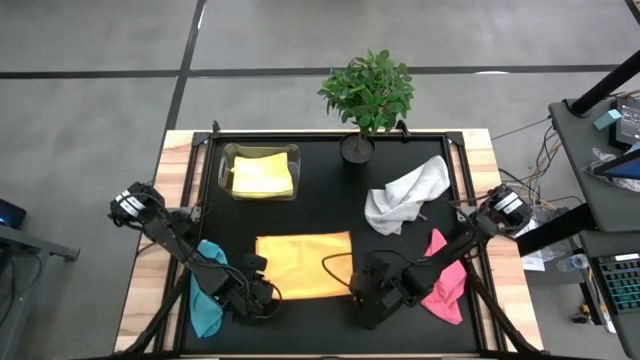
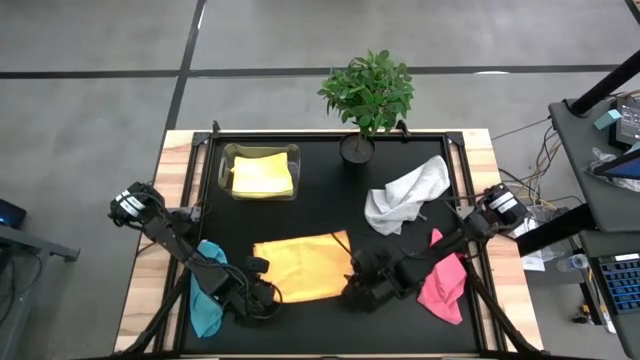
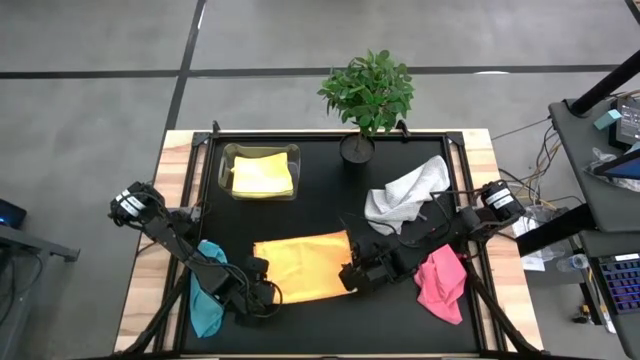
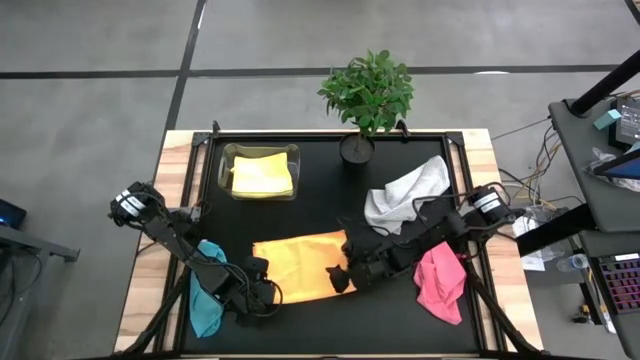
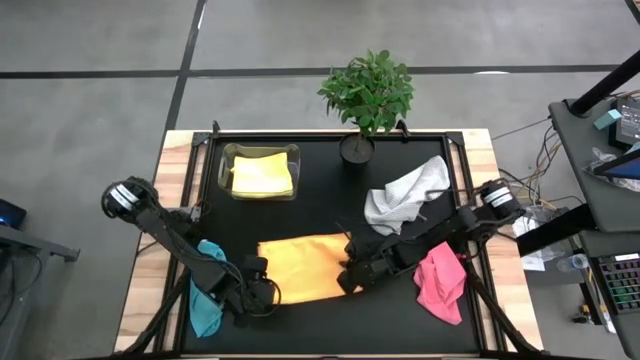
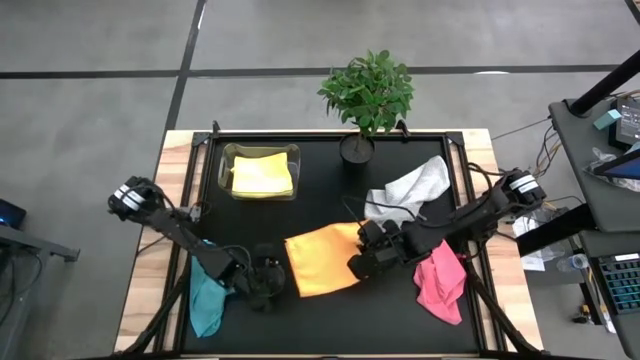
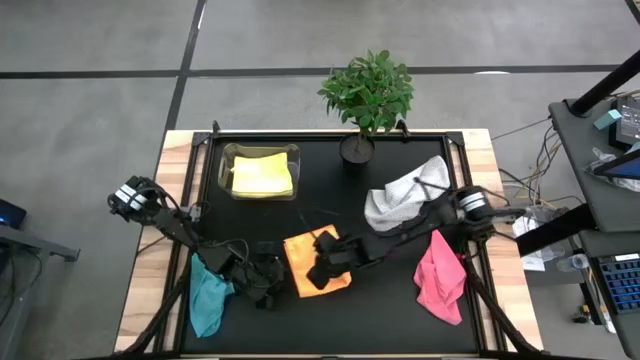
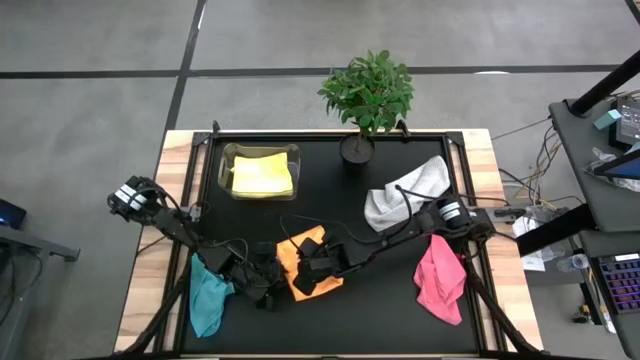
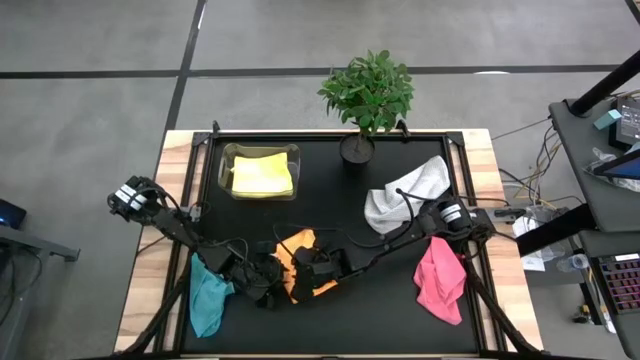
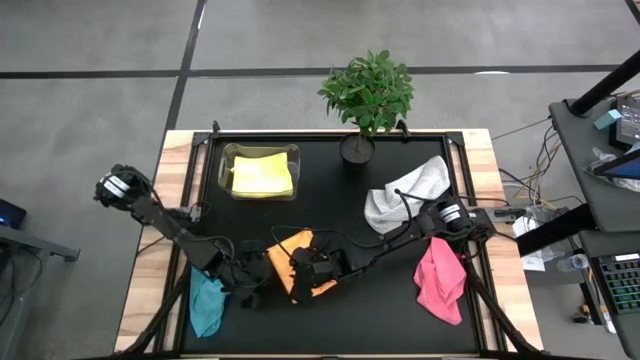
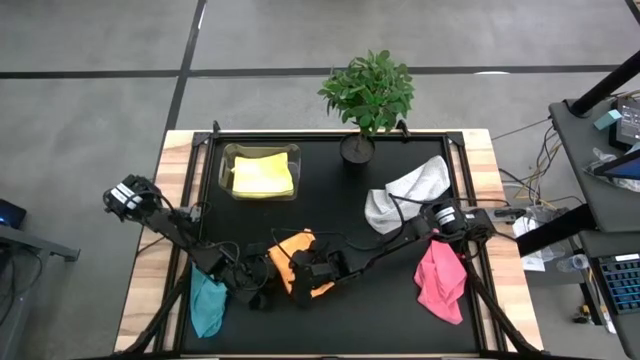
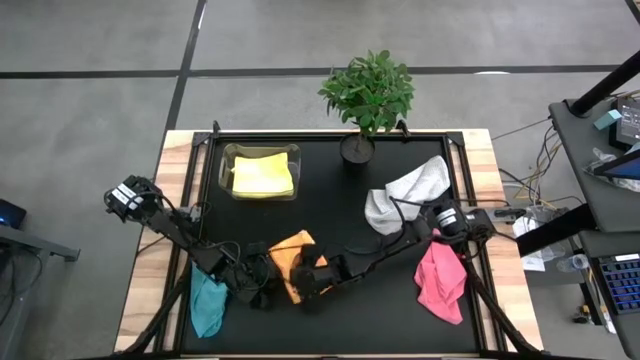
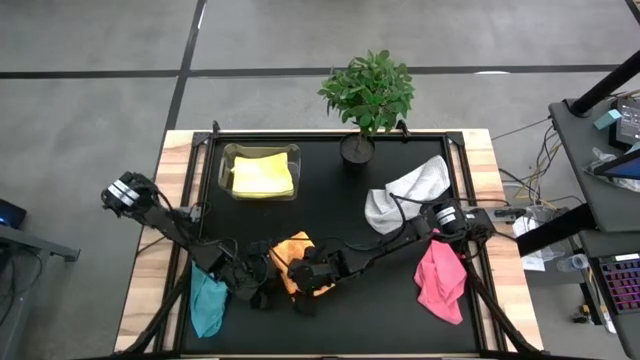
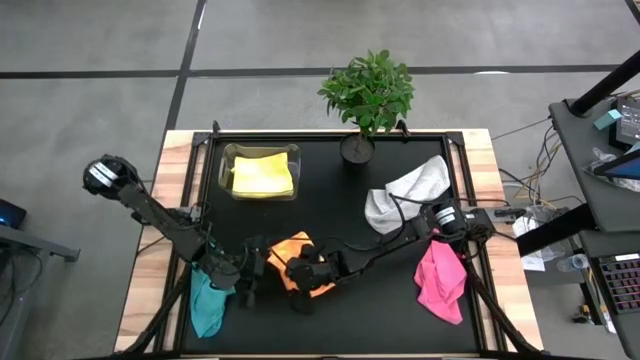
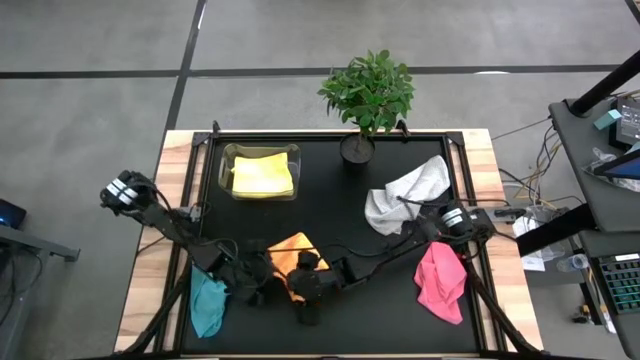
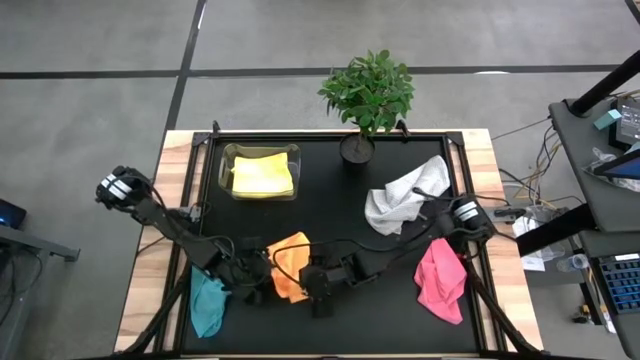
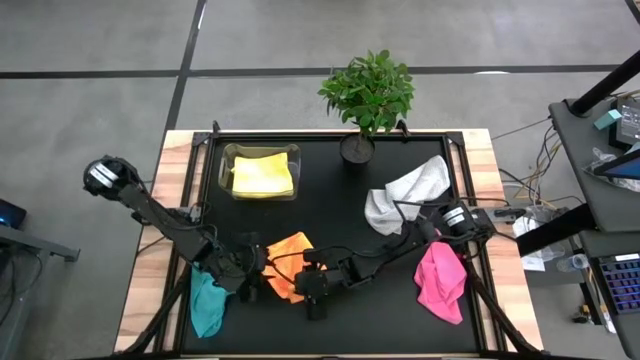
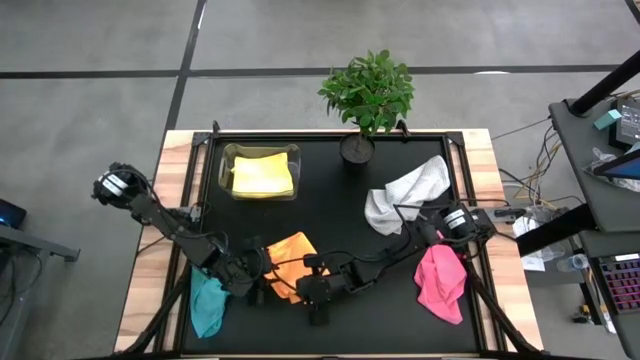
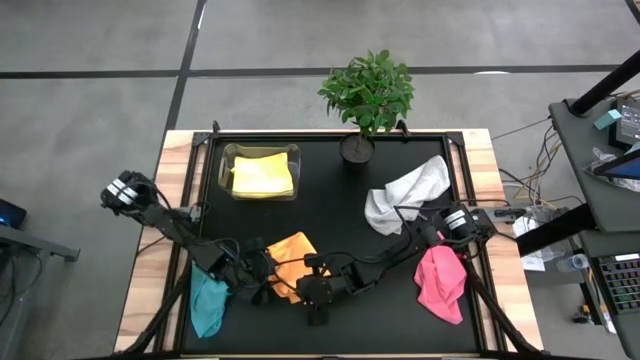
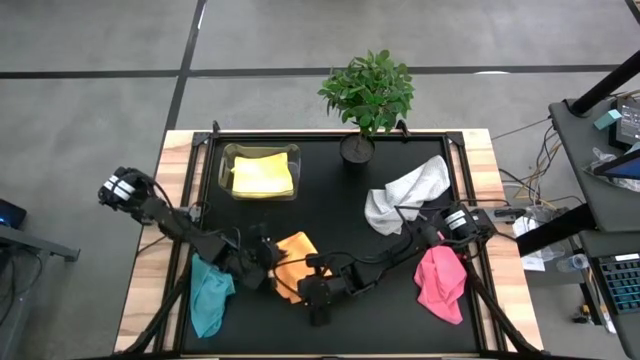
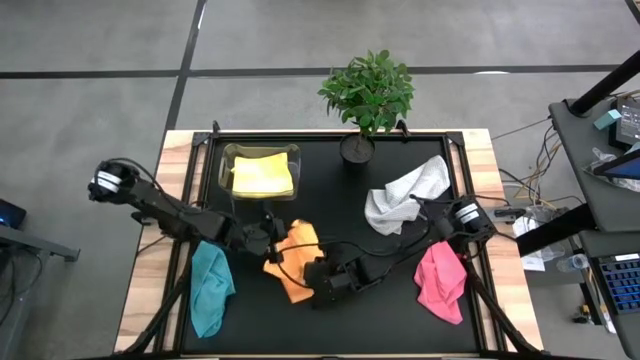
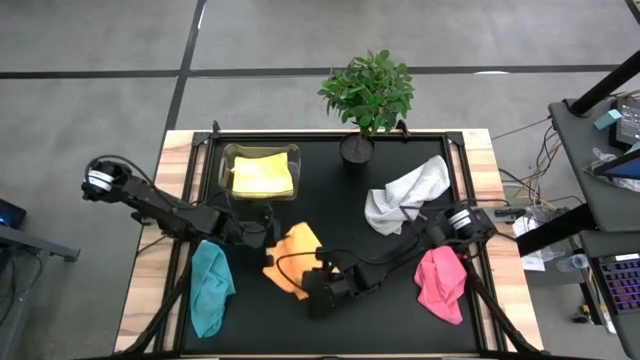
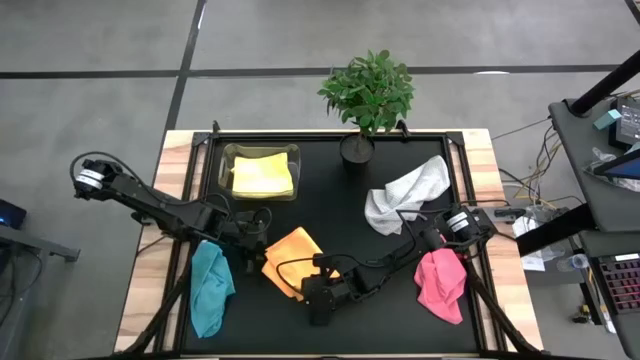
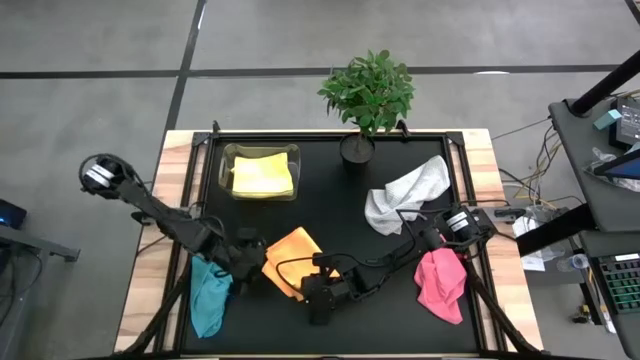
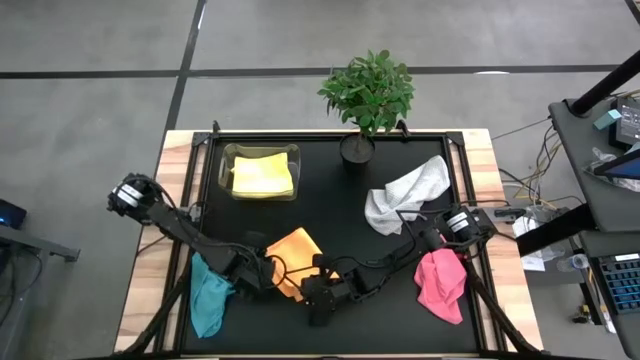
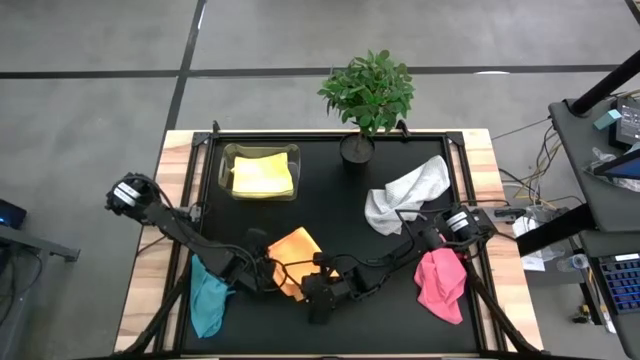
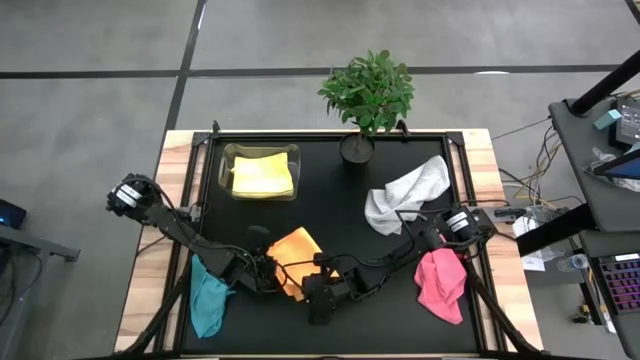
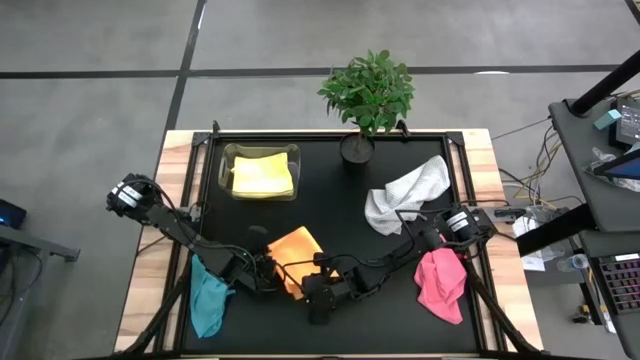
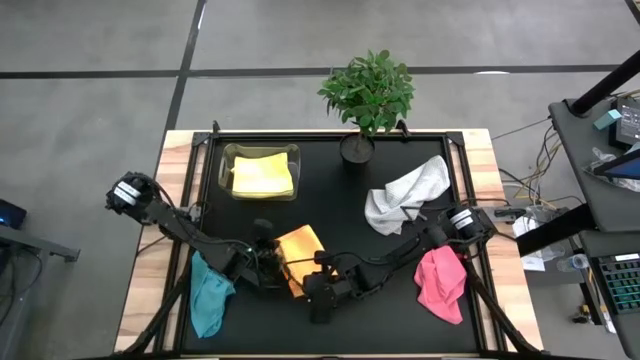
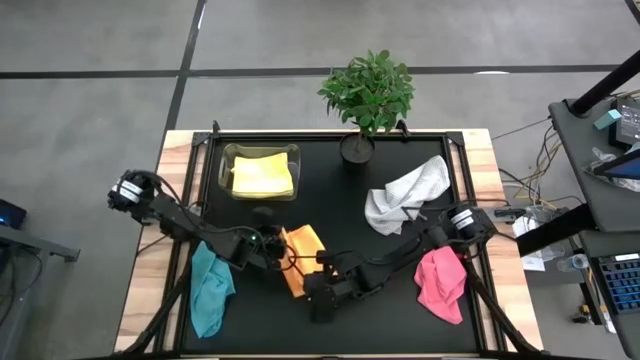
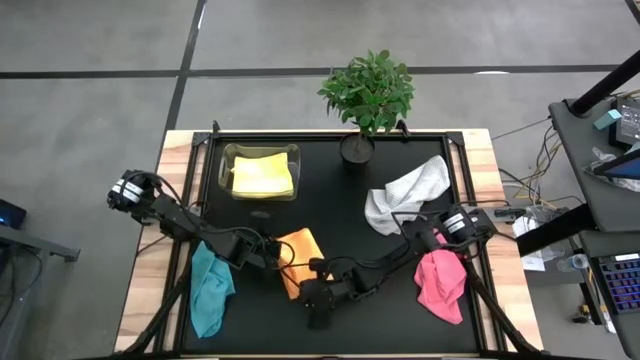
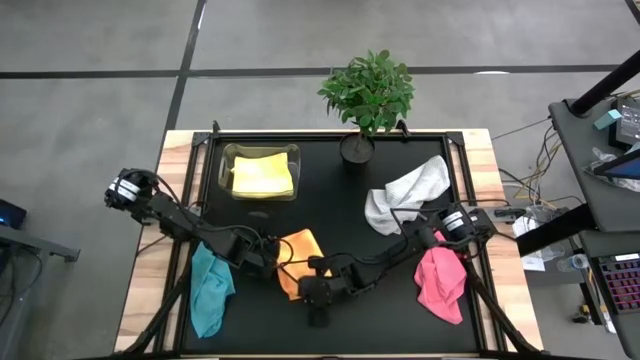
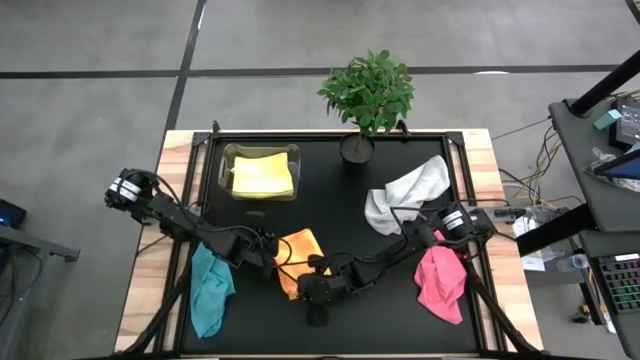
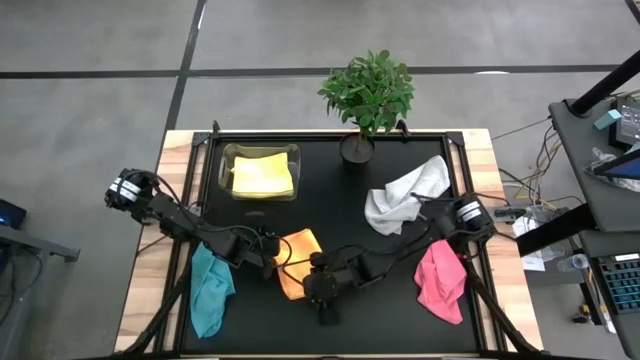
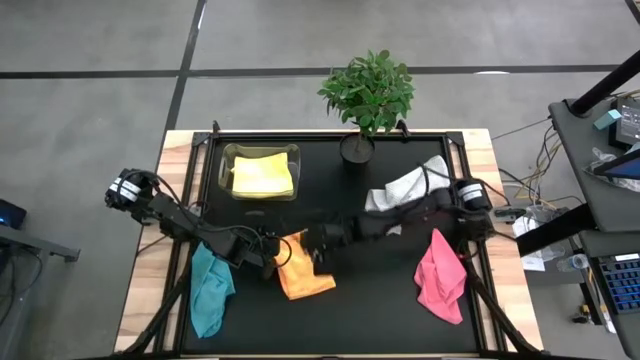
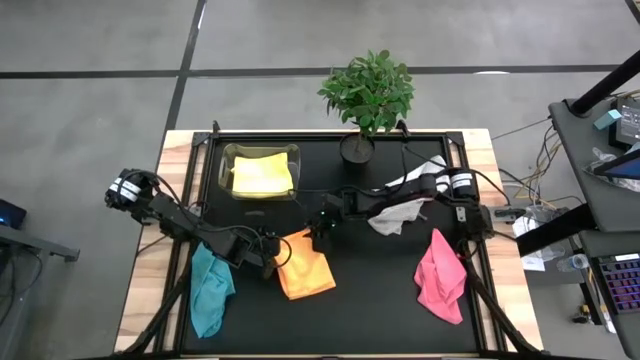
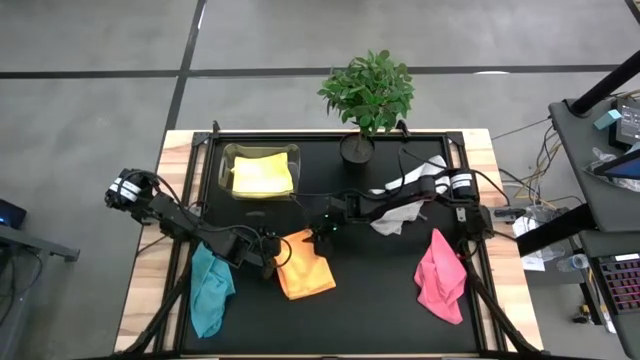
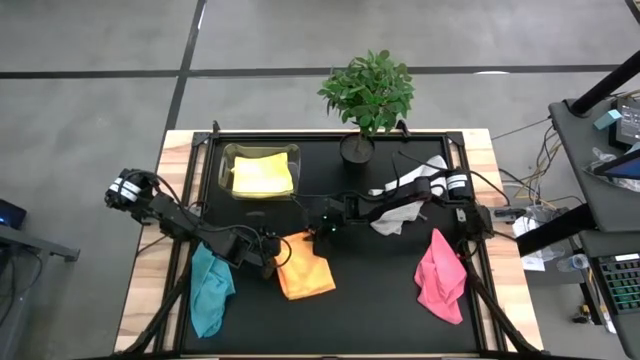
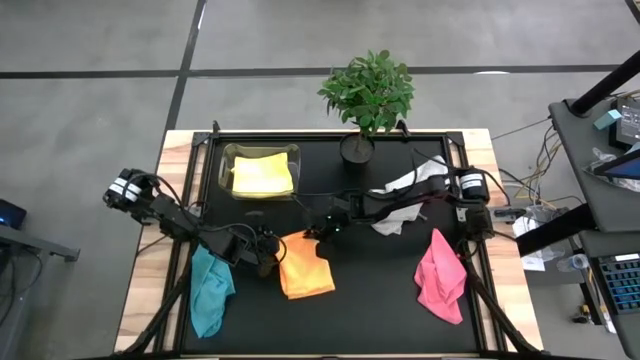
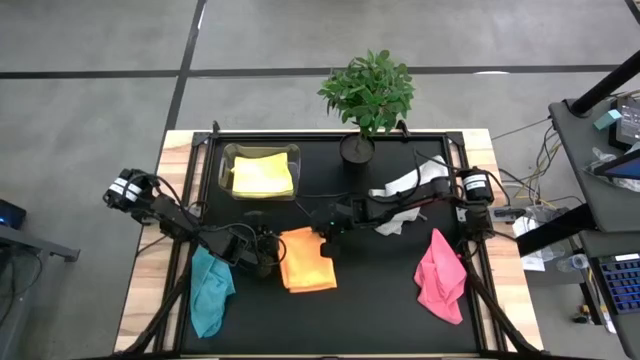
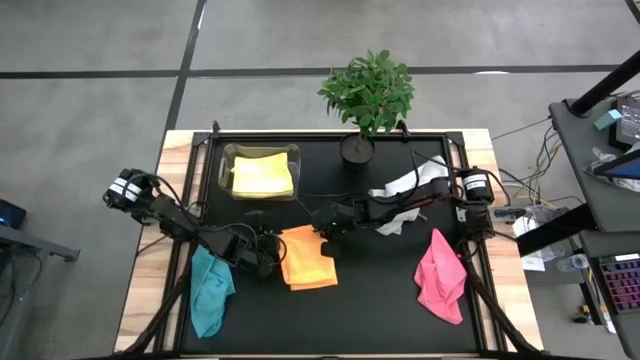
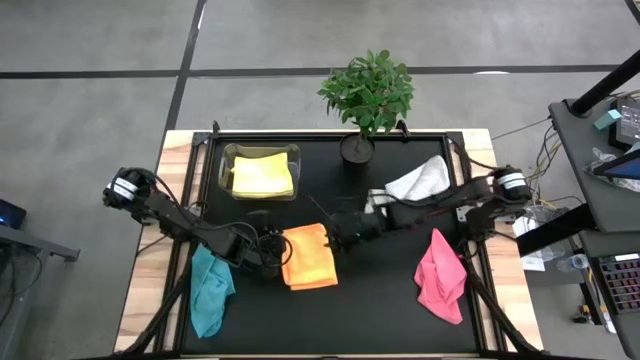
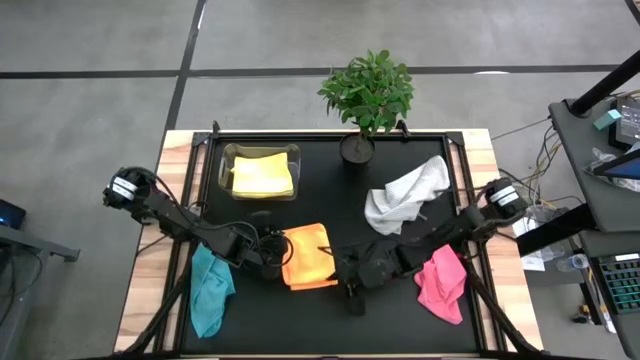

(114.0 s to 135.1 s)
Task: Fold microfiber towels
Fold the orange towel
